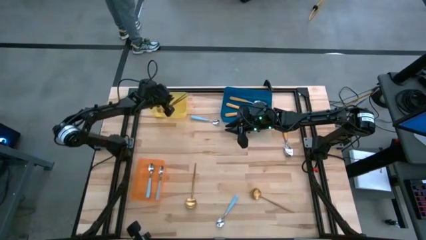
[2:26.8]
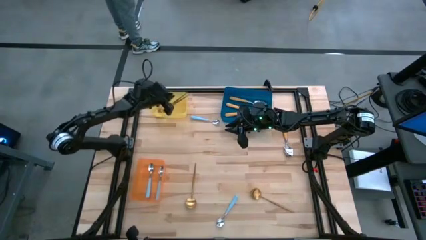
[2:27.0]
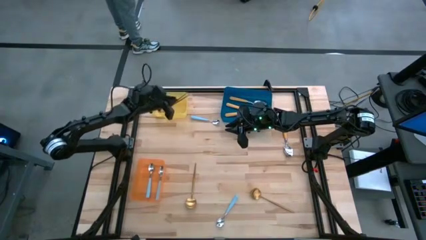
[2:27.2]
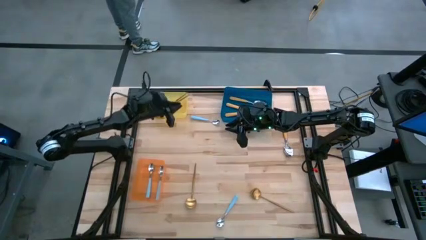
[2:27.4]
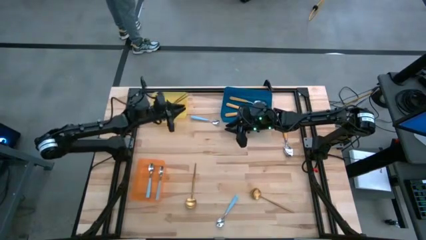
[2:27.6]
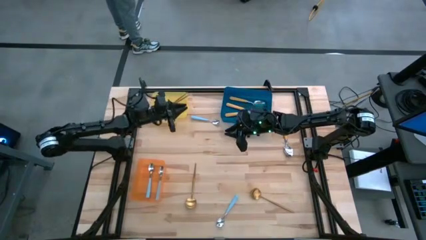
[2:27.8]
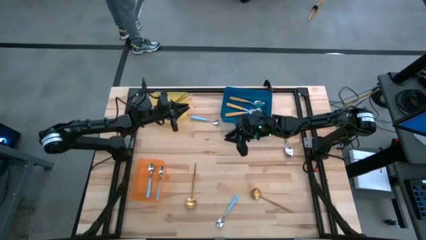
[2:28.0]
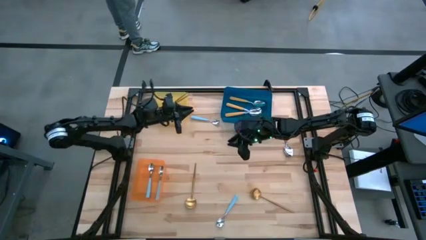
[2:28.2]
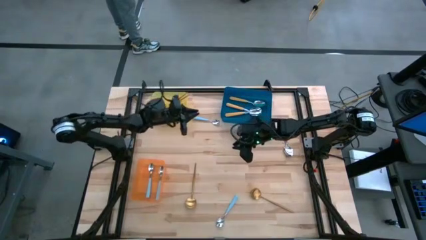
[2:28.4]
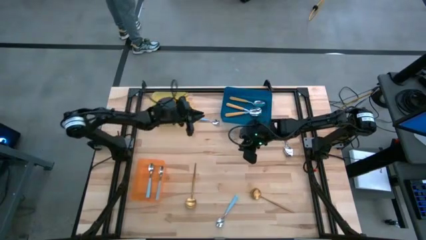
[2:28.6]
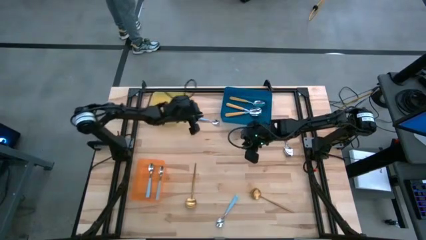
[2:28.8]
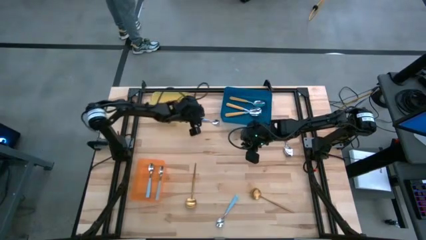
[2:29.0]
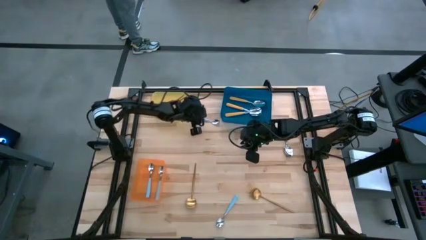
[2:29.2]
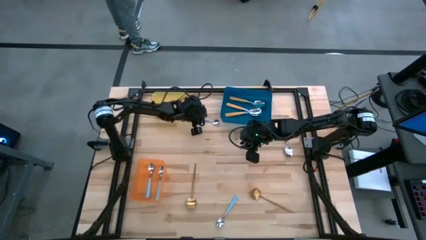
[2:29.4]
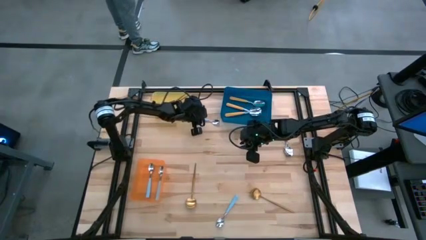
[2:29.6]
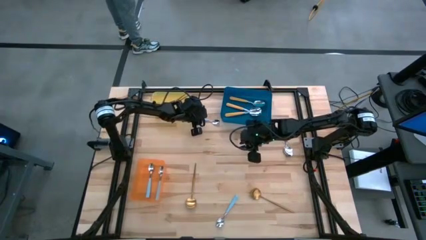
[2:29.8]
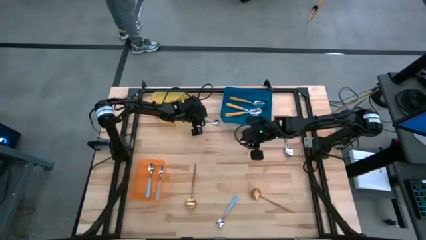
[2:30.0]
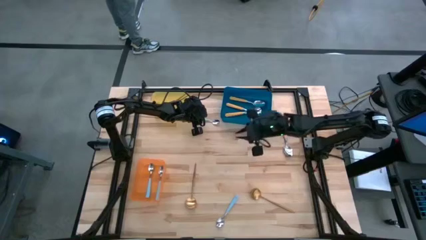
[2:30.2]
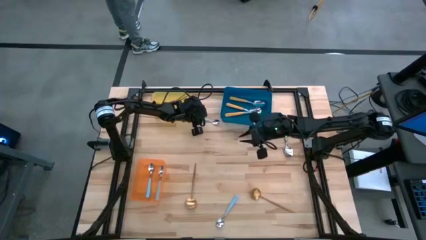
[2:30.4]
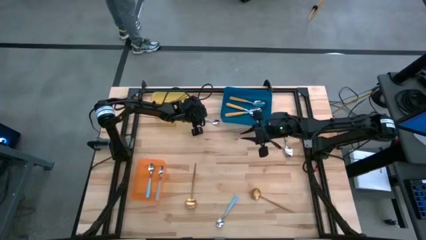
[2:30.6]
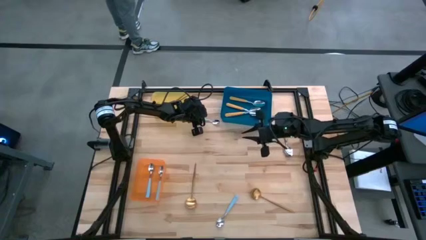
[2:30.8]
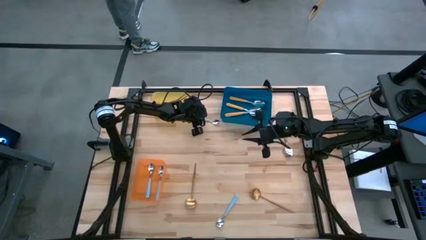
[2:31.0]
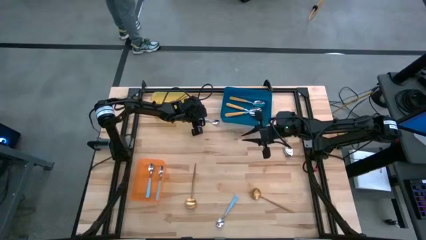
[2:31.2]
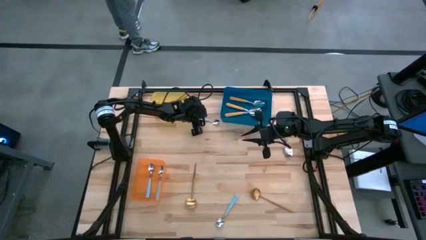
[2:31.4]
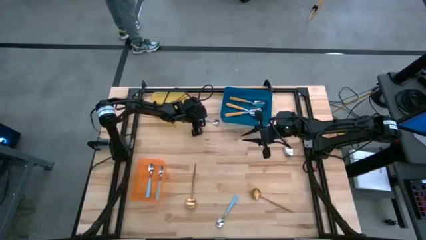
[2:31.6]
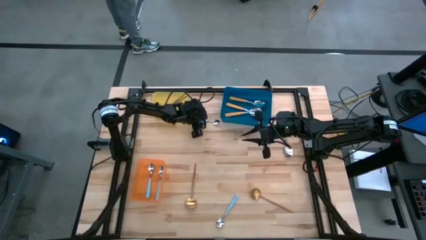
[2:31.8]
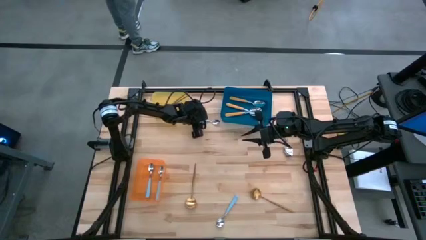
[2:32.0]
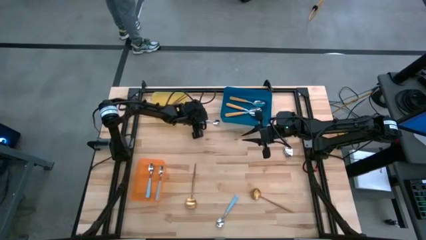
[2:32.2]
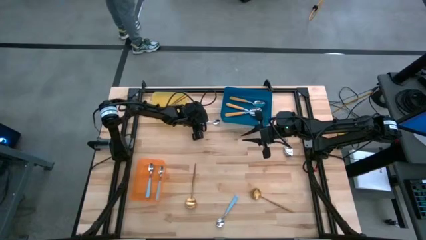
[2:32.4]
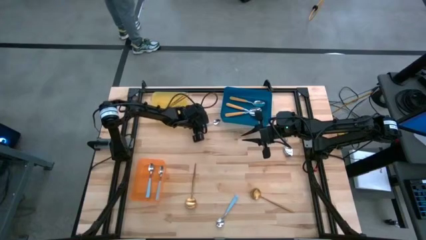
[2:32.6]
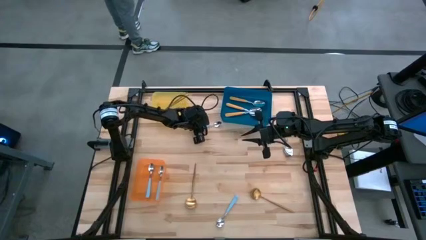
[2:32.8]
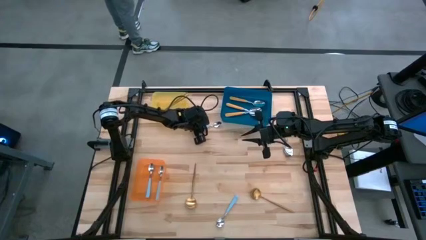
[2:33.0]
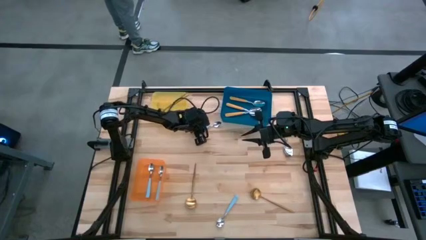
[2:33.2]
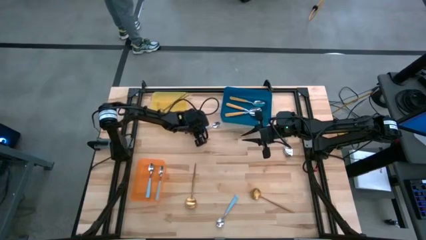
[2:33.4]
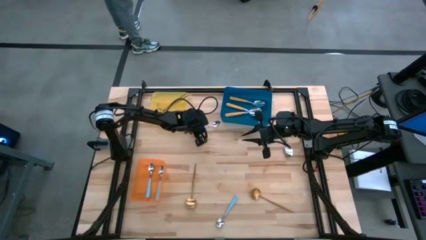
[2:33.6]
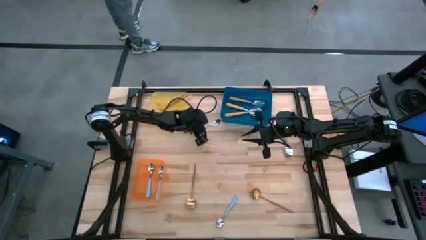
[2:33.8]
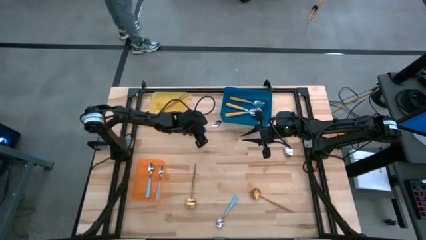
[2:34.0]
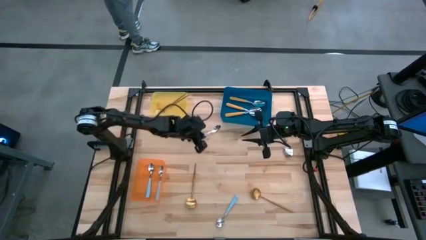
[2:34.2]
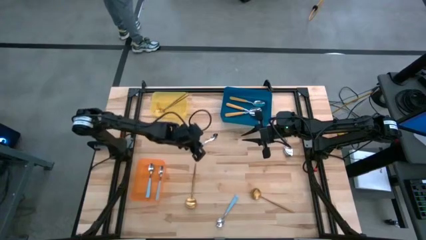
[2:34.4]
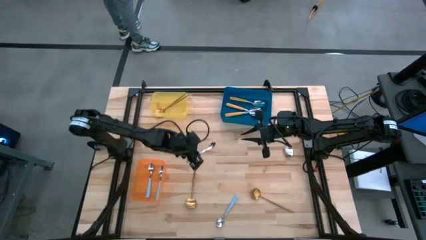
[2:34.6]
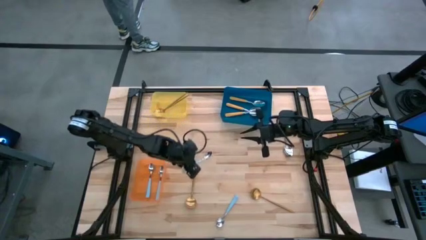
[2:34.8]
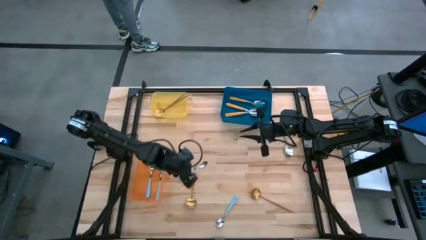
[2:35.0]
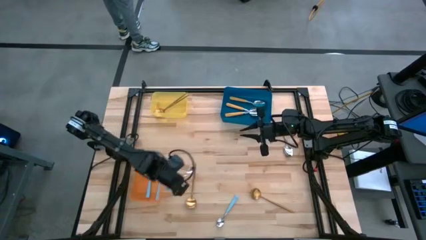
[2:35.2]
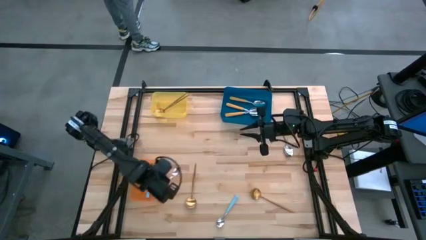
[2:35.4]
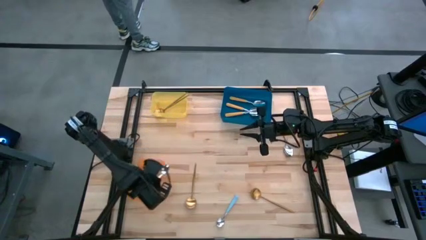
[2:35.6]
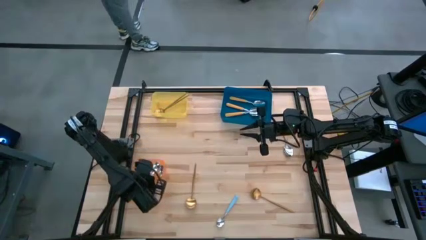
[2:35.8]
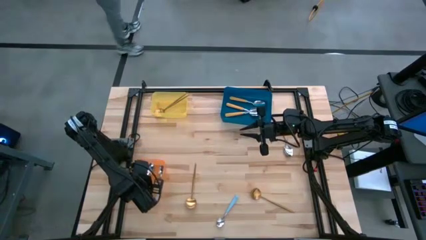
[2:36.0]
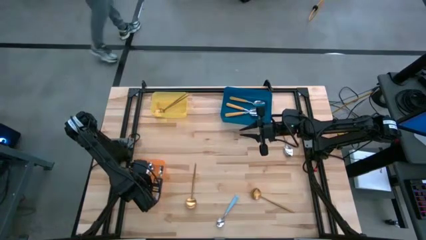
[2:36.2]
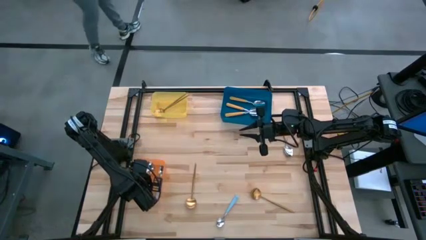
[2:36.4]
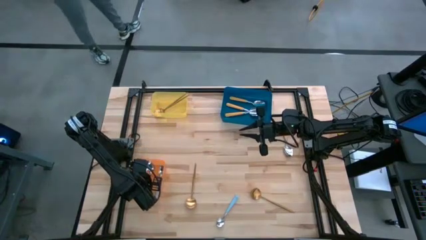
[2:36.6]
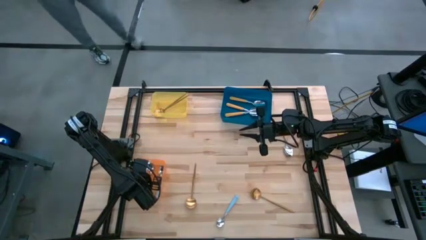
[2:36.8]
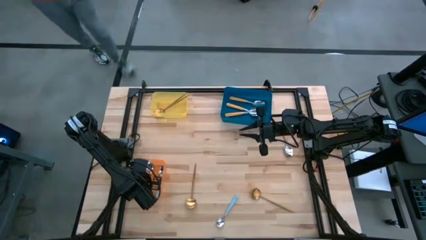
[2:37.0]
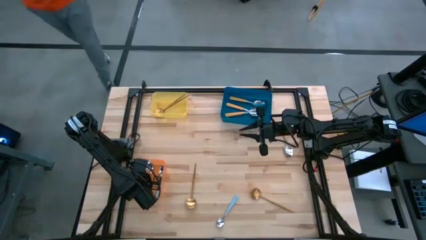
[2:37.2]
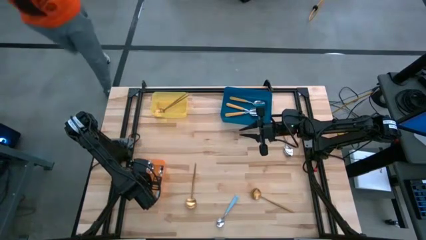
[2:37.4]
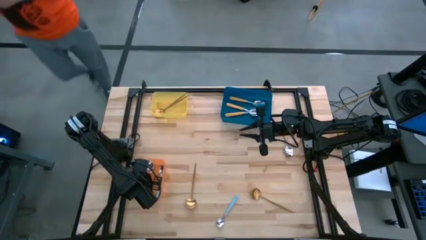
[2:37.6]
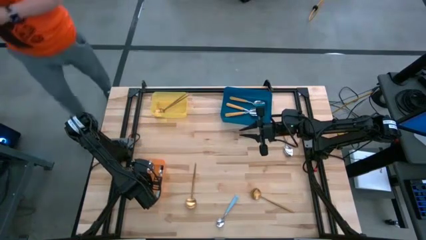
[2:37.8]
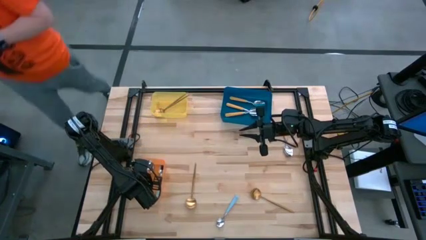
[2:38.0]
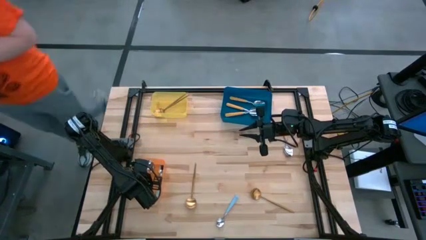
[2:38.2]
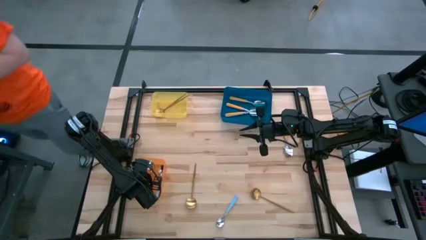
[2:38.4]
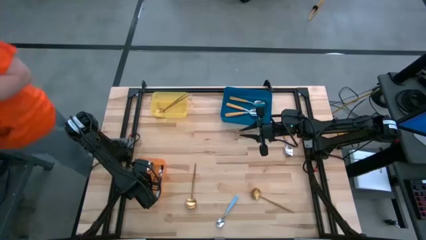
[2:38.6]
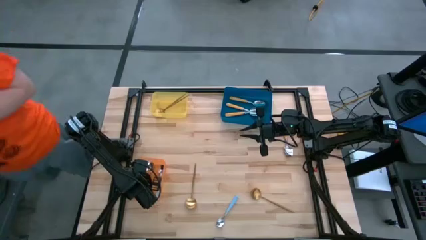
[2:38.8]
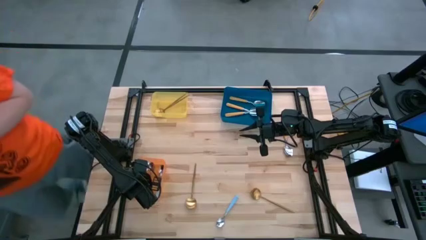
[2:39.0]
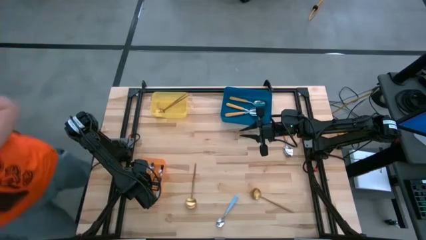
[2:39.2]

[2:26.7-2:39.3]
Task: Sort silverware by color (type)
Put the blue spoon into the orange bin

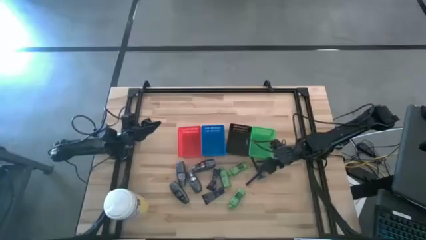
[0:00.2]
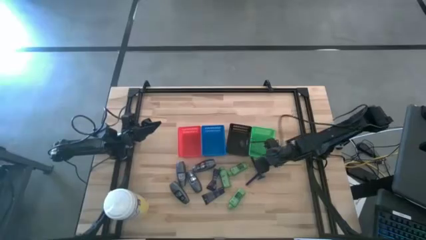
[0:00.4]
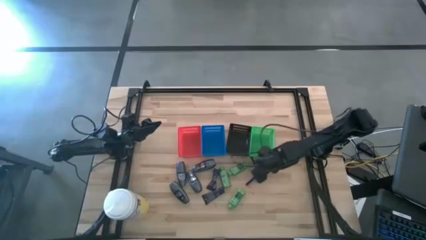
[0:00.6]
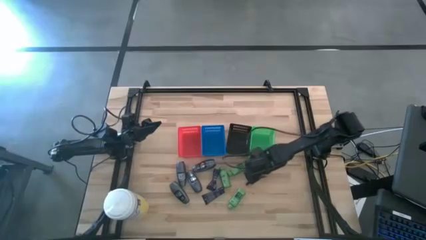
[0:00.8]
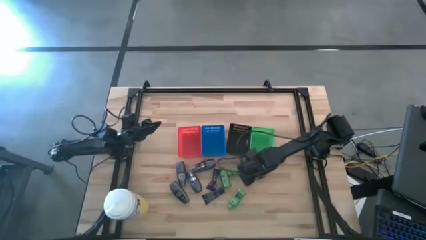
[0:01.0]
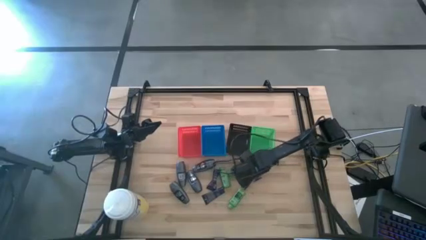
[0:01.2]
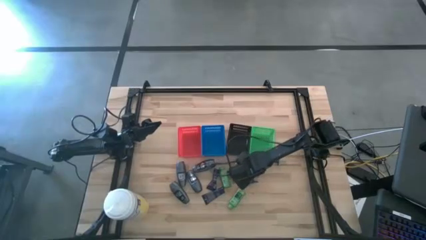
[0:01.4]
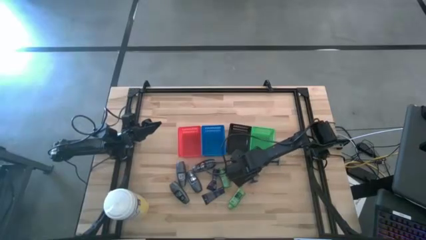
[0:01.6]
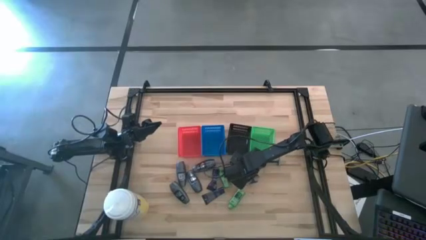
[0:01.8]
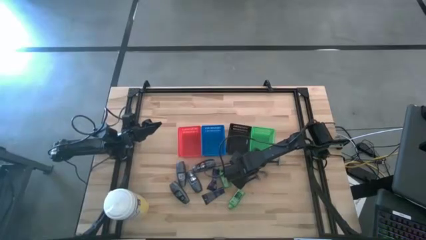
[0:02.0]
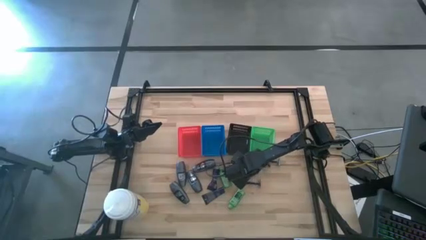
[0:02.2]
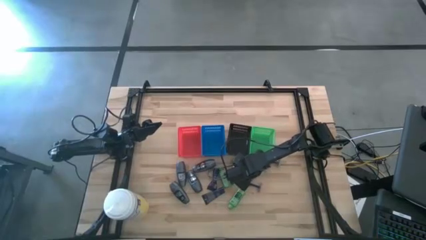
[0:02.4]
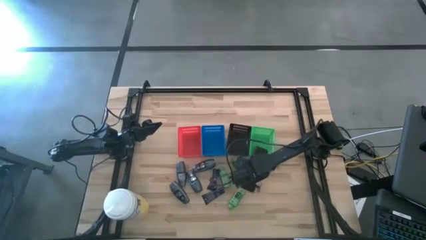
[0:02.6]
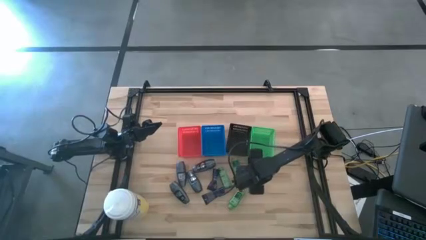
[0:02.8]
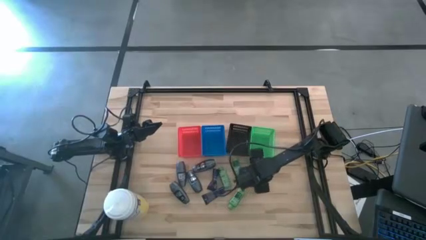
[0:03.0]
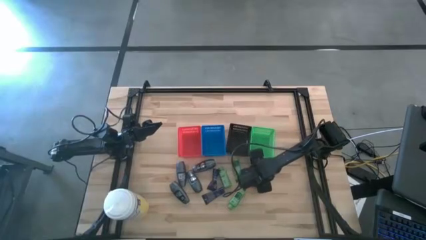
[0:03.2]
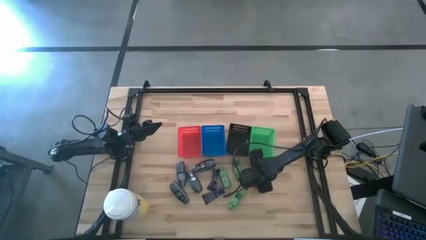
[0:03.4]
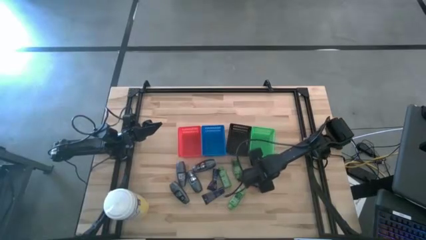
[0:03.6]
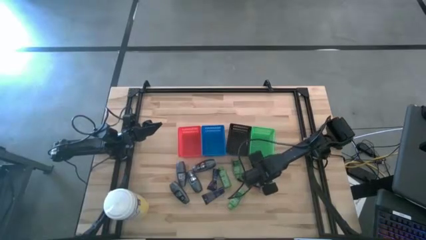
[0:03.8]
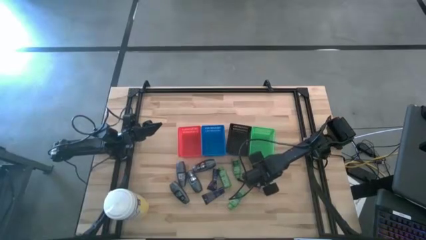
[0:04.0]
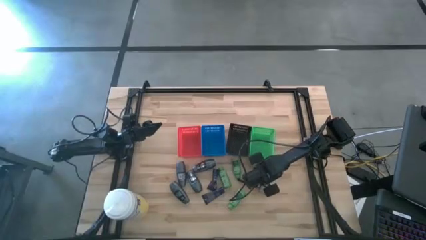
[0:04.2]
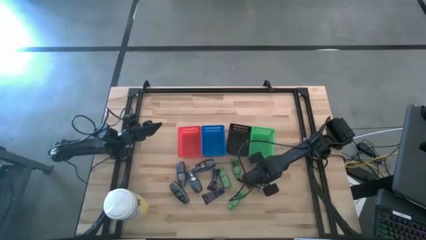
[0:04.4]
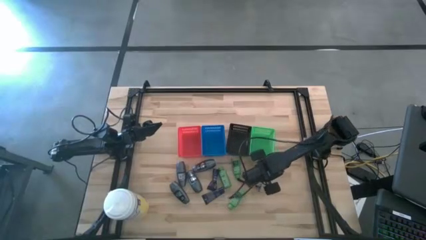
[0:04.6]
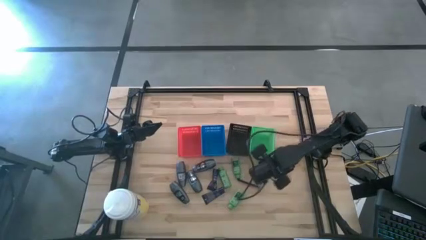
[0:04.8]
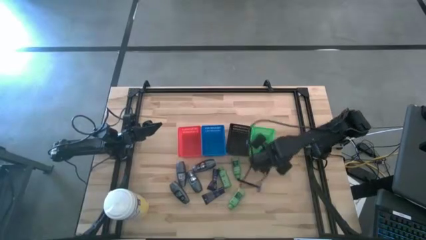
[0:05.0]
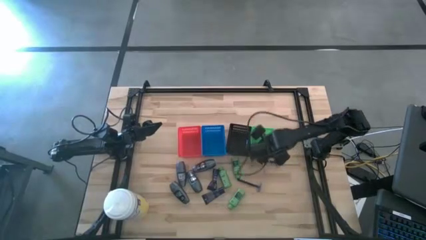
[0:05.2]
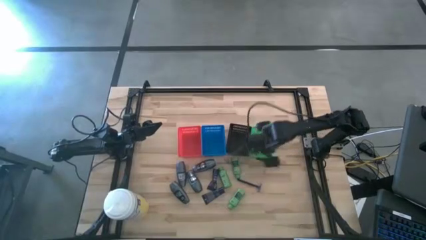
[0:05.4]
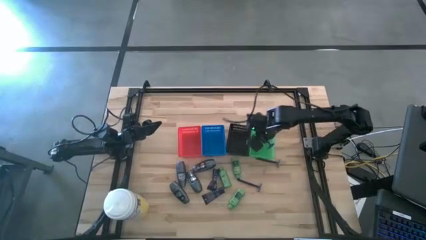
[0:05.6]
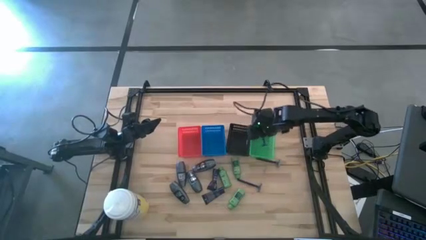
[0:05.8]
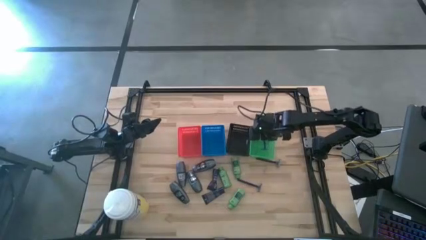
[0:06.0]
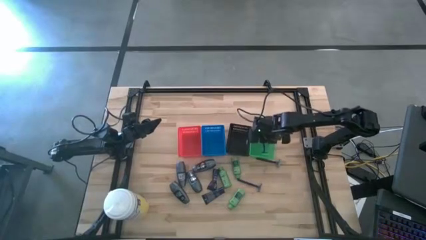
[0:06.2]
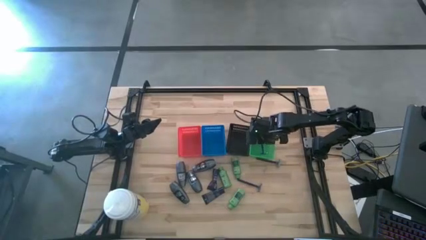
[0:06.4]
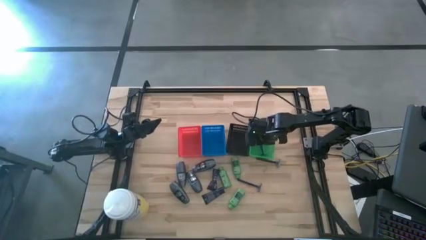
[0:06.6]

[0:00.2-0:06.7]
Task: Pick & Place Travel size toiletries
Put the razor into the green bin
